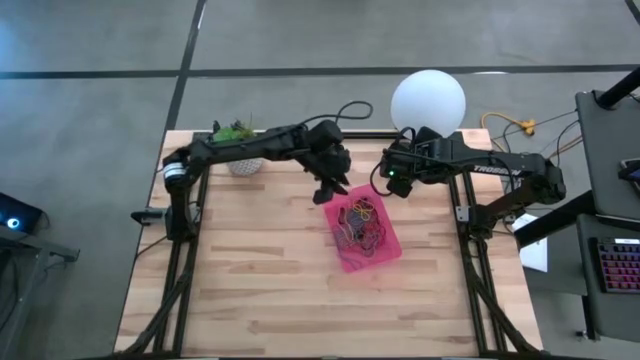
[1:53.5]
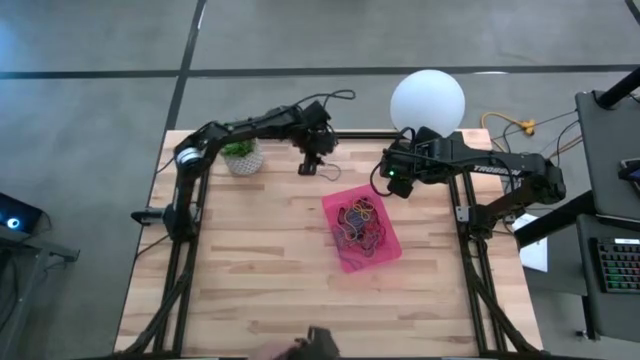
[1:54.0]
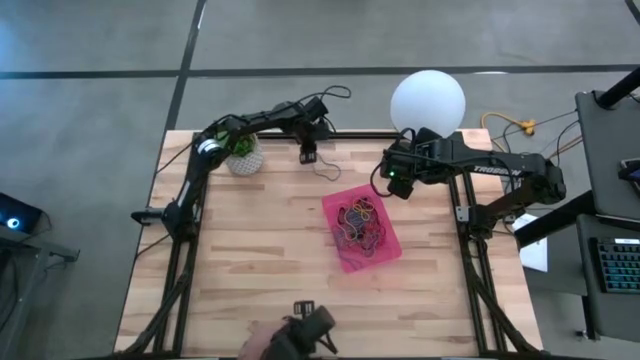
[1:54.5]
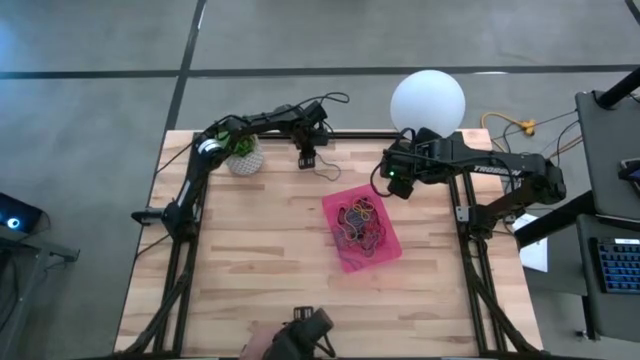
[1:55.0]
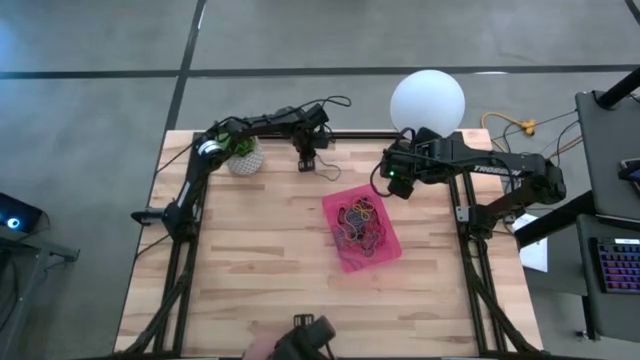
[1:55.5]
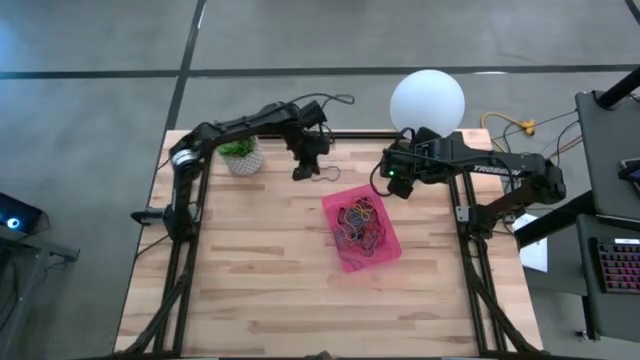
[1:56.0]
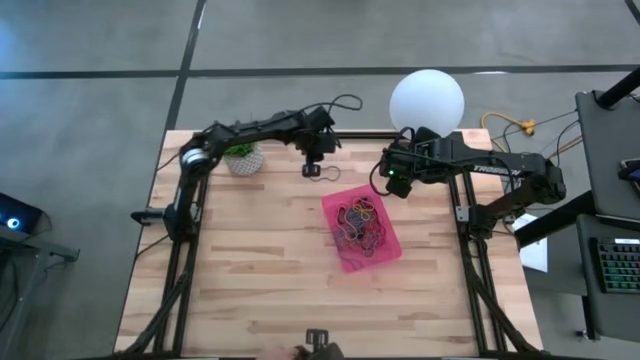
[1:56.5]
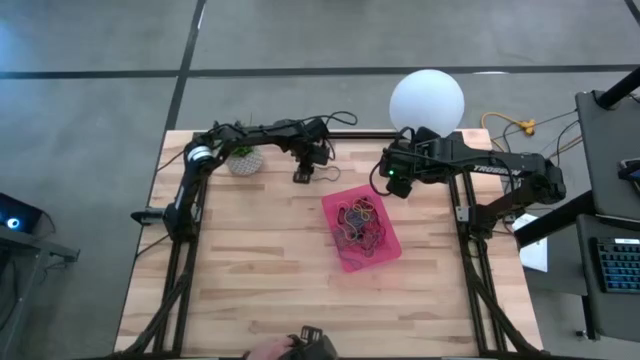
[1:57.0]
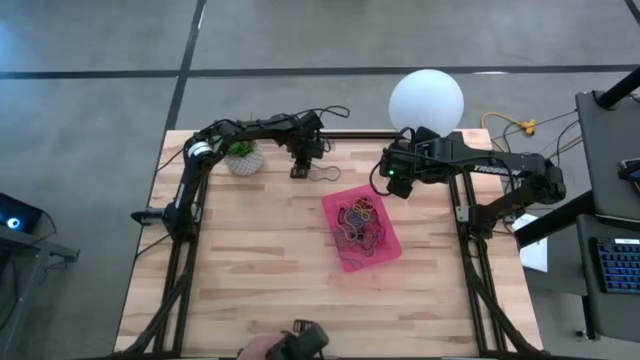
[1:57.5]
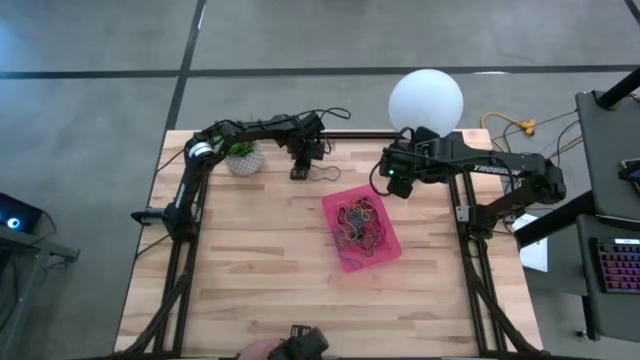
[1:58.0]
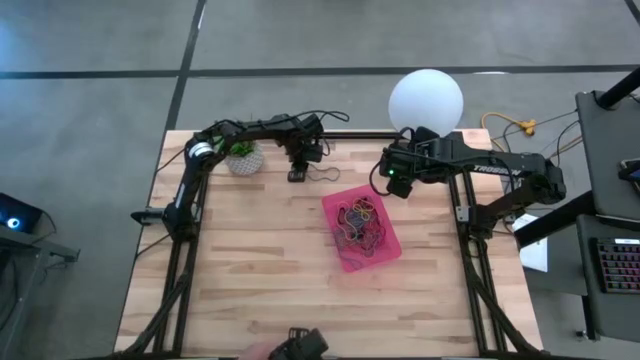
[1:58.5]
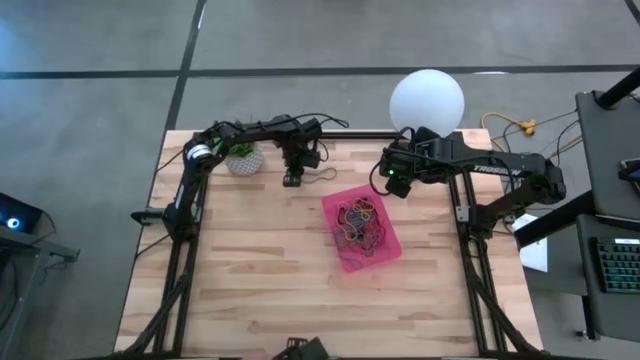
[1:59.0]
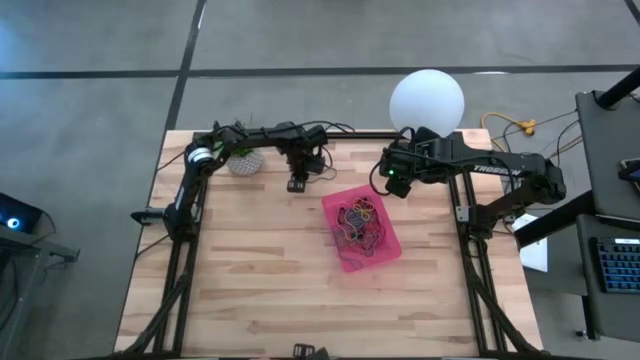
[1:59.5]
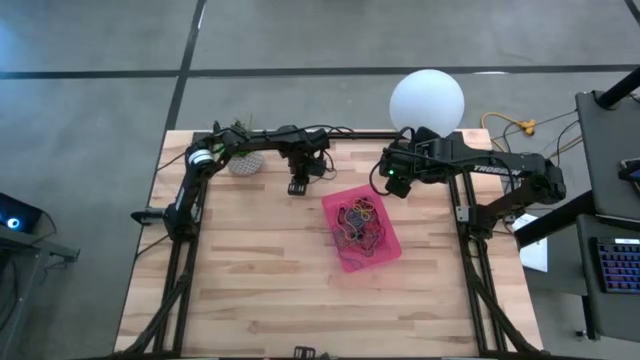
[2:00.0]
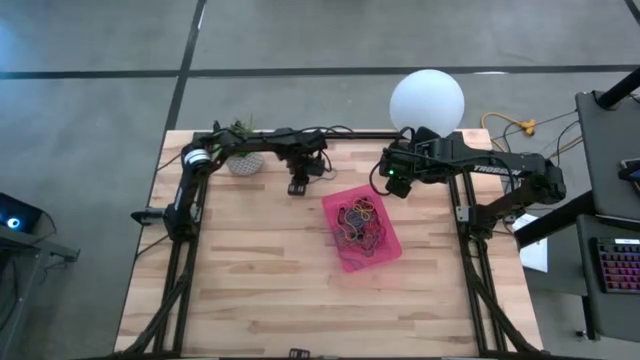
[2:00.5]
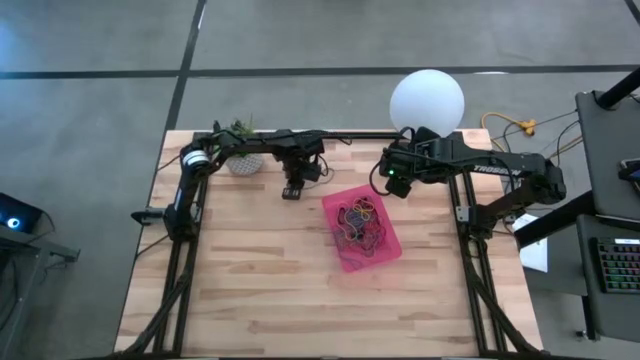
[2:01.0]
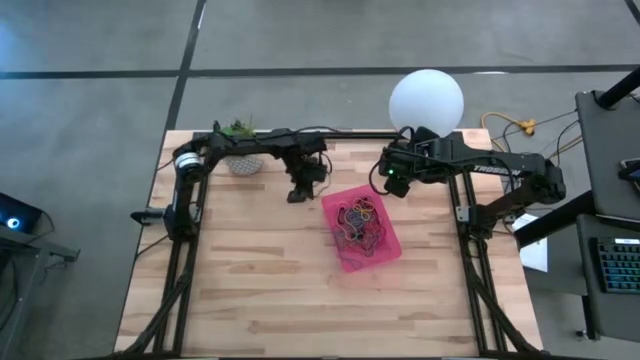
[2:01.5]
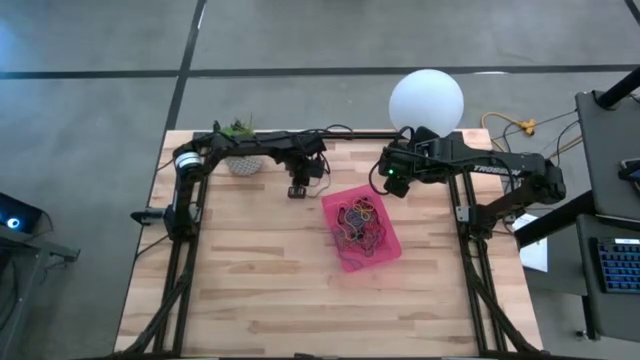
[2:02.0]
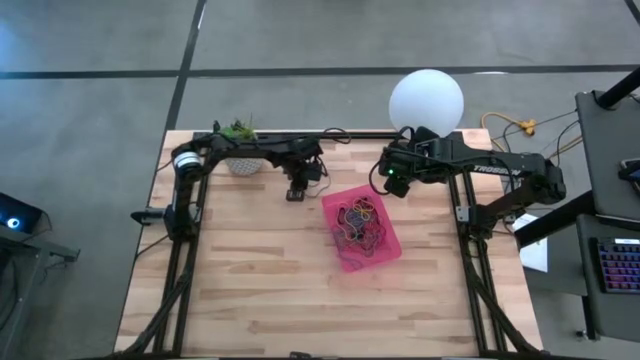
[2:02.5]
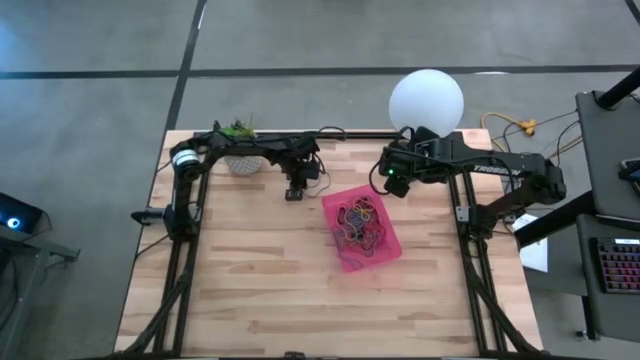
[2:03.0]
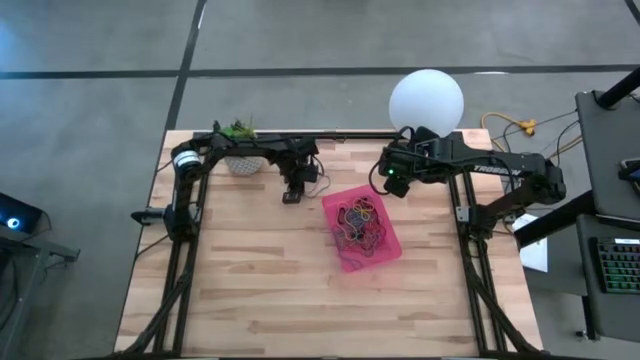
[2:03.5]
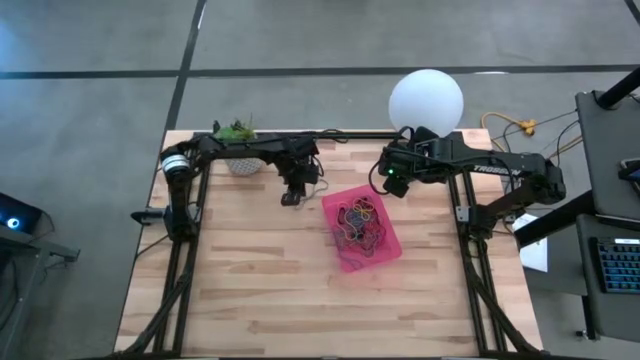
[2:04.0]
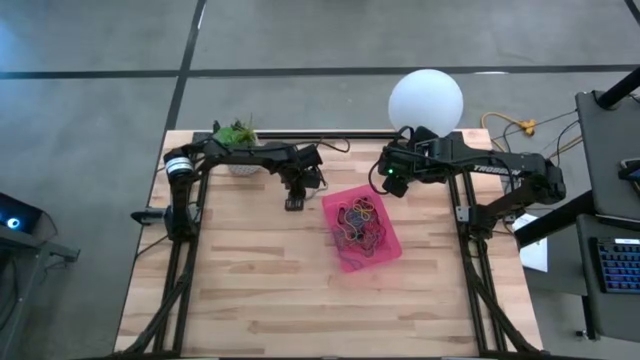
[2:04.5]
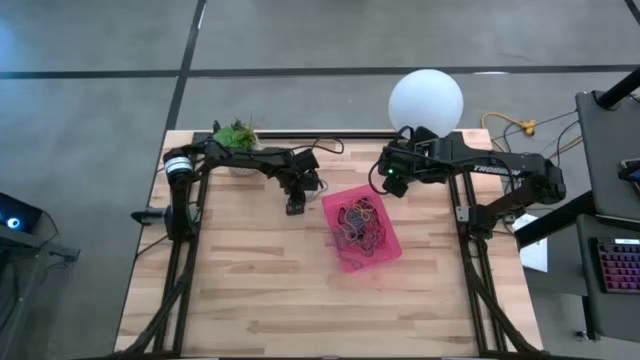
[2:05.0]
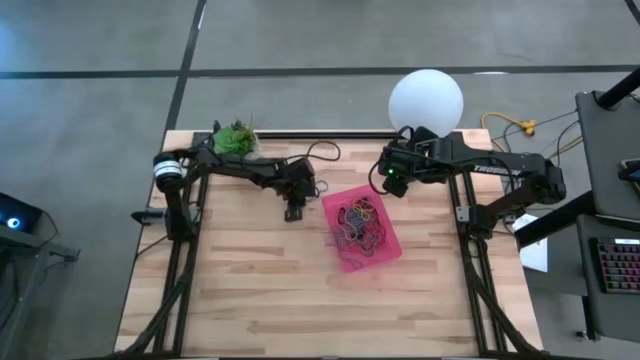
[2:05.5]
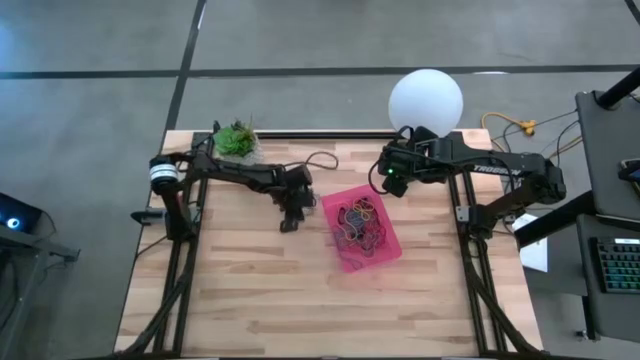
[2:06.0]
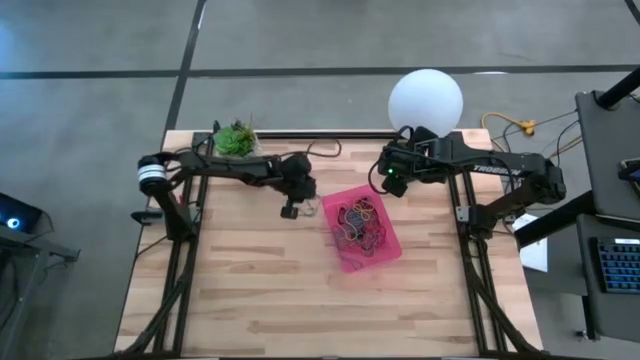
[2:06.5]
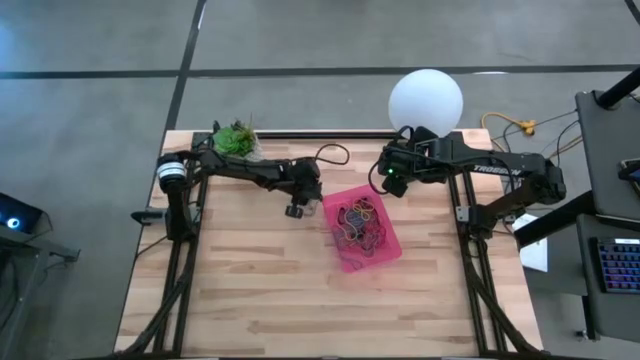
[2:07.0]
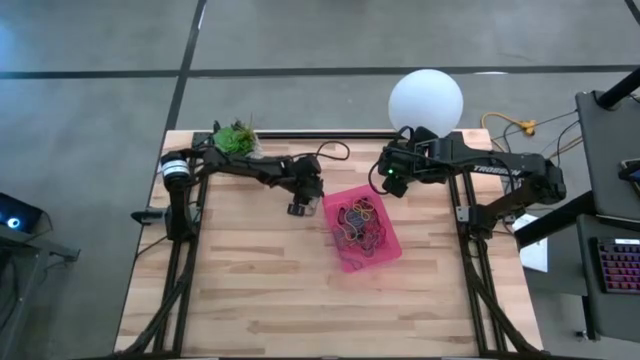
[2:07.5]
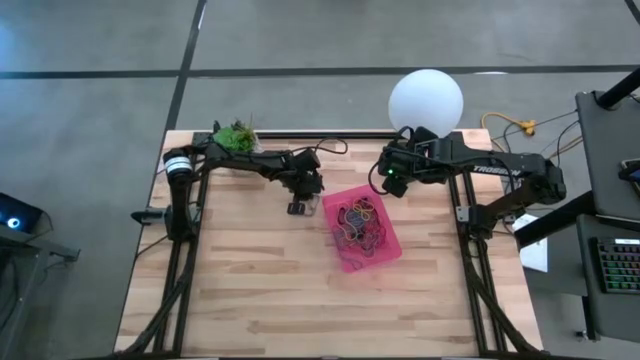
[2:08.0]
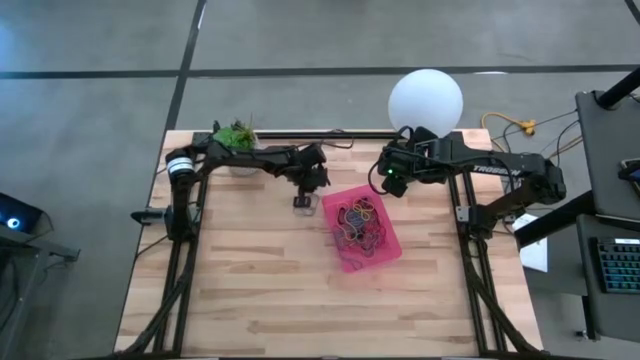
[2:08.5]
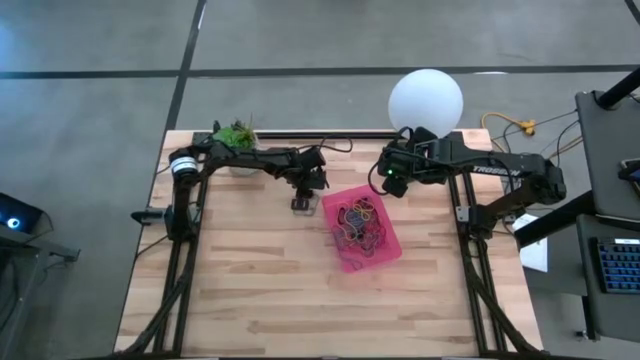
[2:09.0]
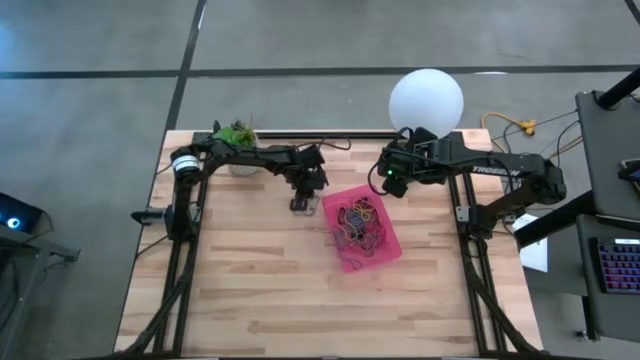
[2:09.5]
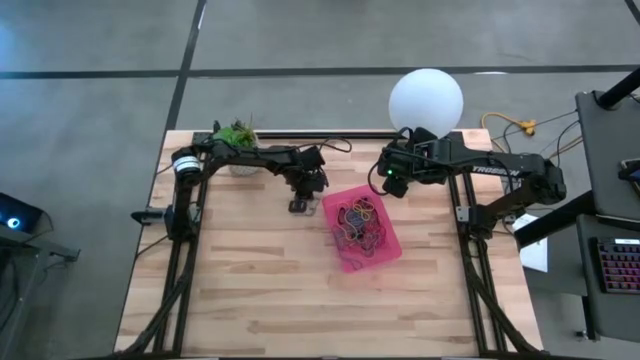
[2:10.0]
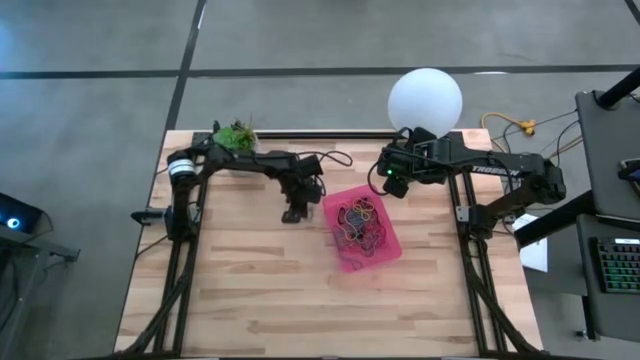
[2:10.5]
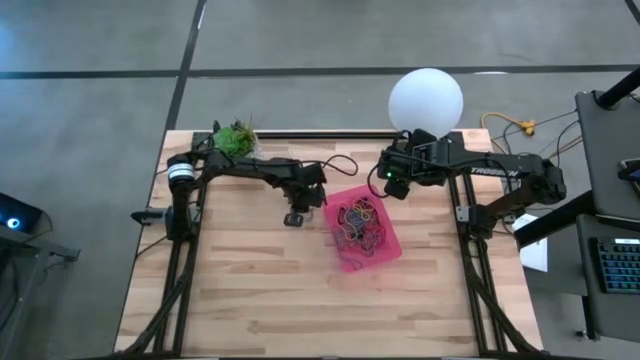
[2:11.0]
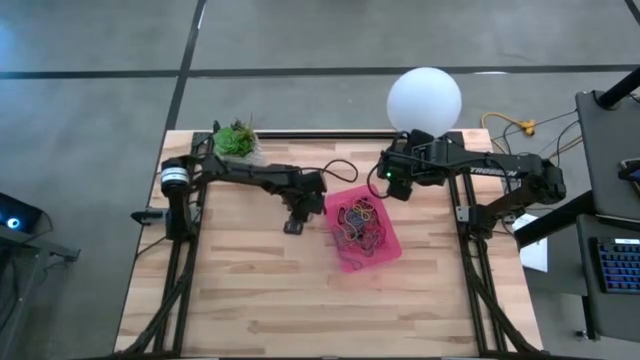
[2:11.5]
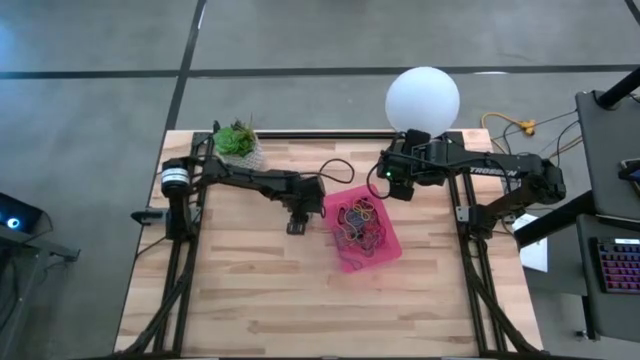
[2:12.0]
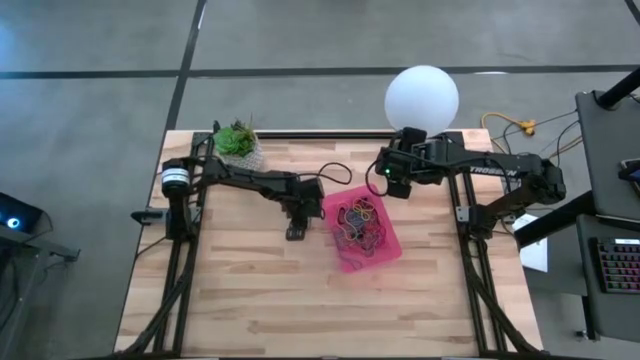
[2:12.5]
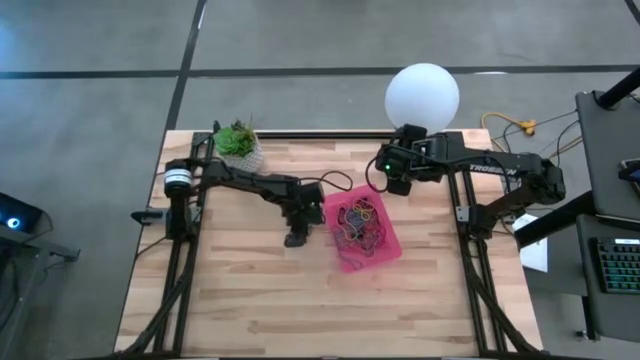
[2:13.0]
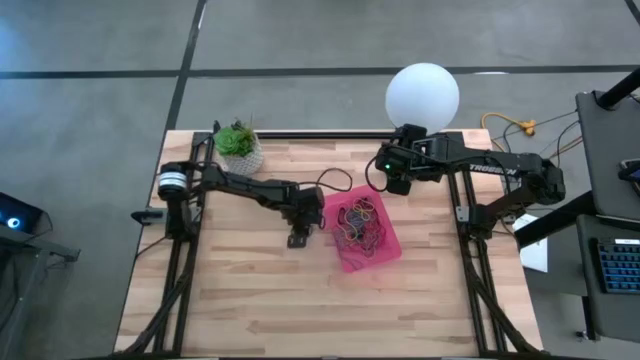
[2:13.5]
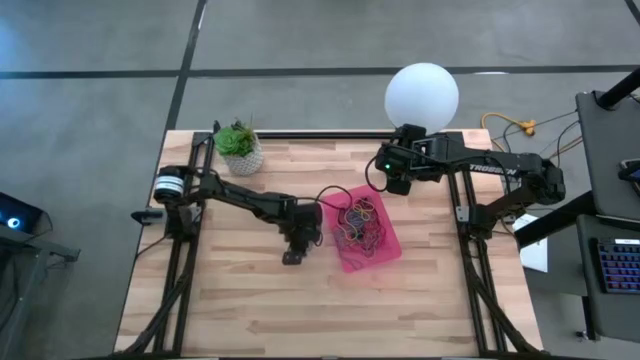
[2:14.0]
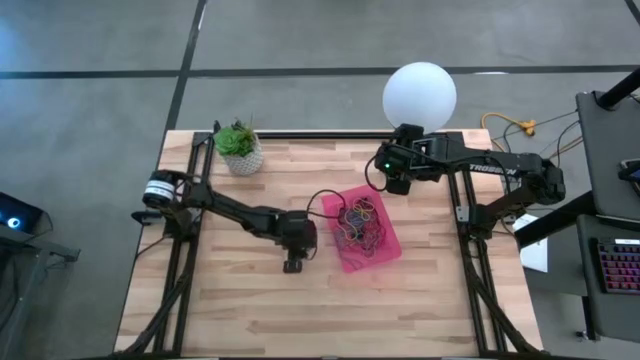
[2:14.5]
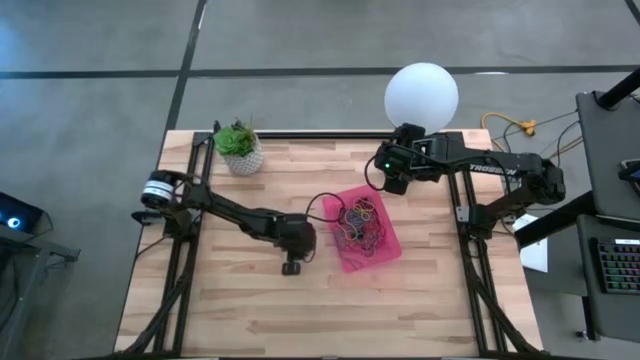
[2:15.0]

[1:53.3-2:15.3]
Task: Pick and place rubber bands into bin
Put the blue rubber band into the pink bin

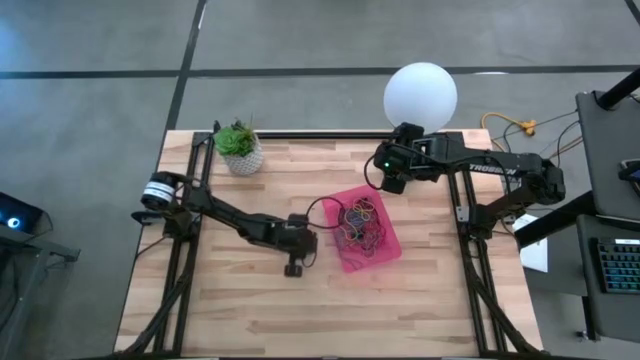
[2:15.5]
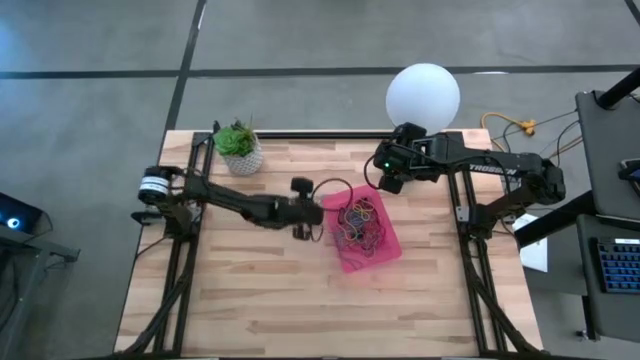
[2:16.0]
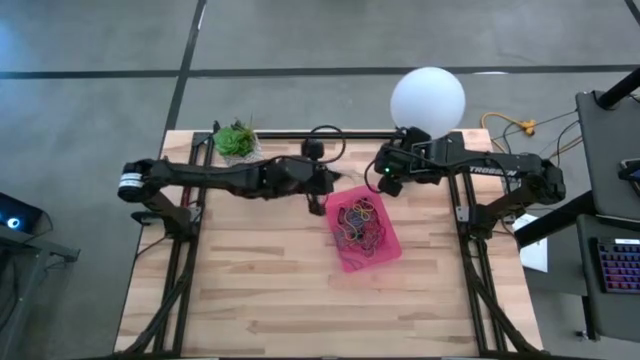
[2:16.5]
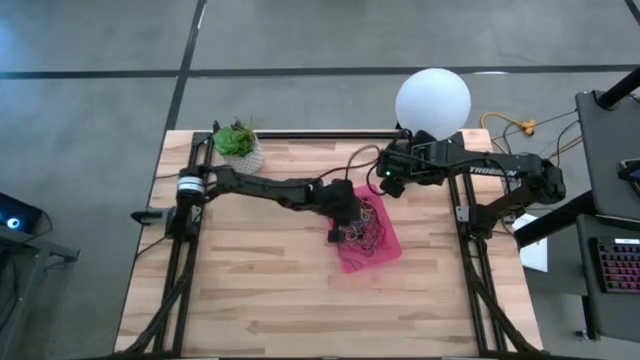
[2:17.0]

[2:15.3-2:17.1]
Put the blue rubber band into the pink bin
